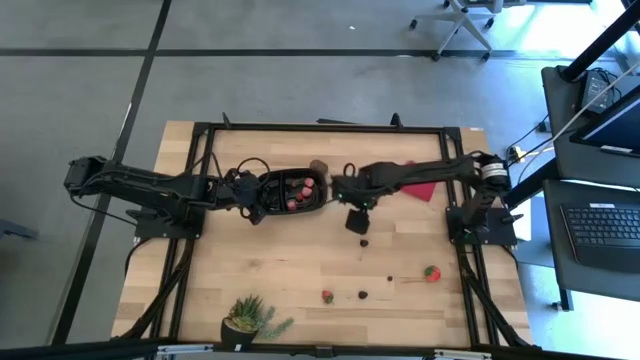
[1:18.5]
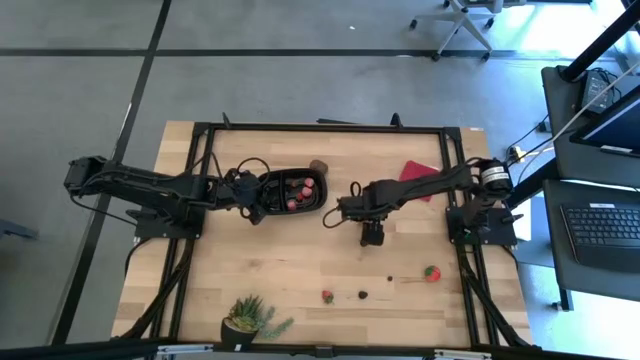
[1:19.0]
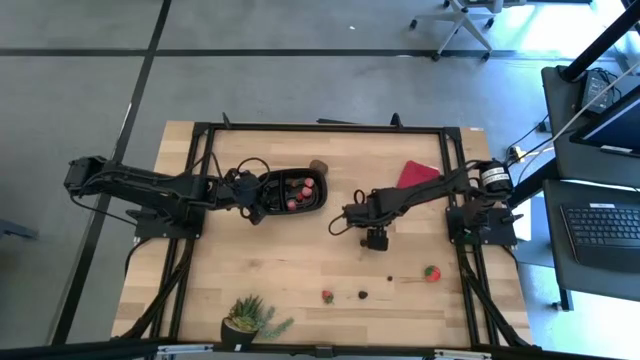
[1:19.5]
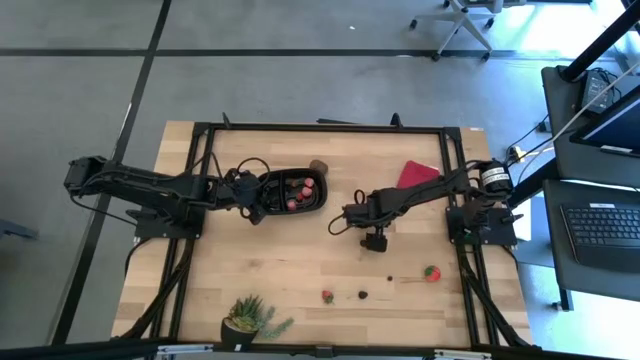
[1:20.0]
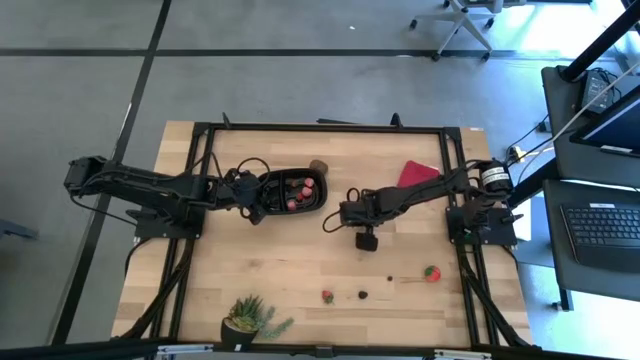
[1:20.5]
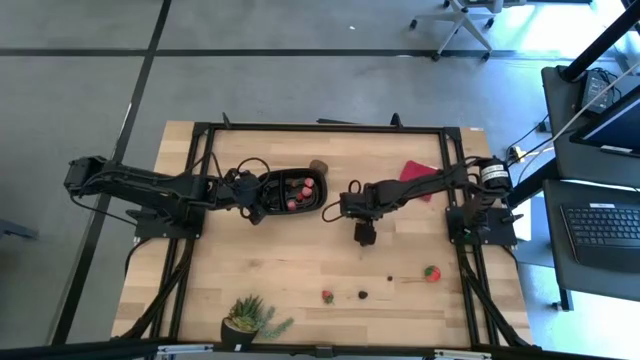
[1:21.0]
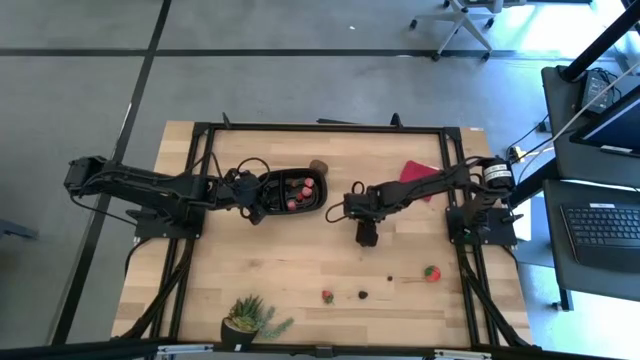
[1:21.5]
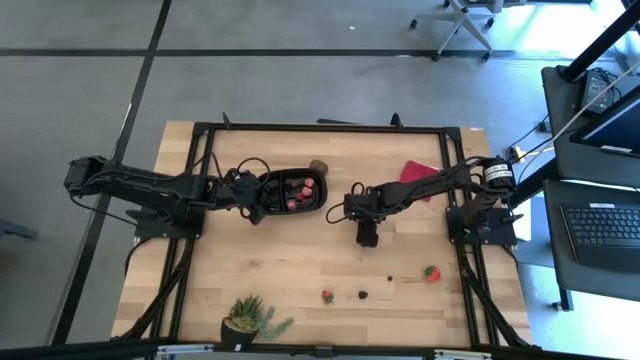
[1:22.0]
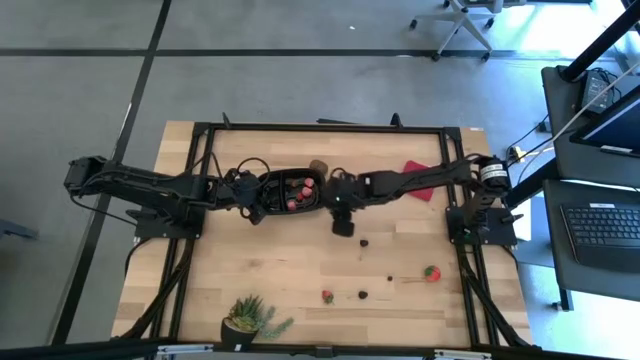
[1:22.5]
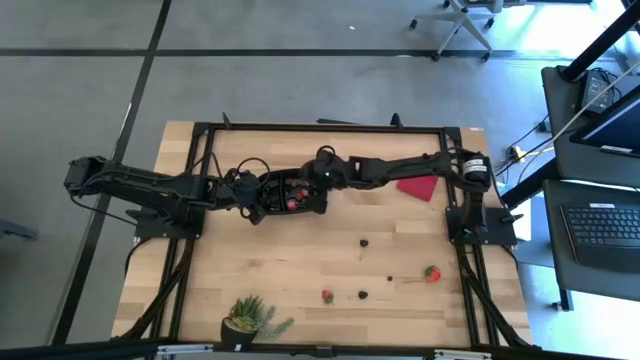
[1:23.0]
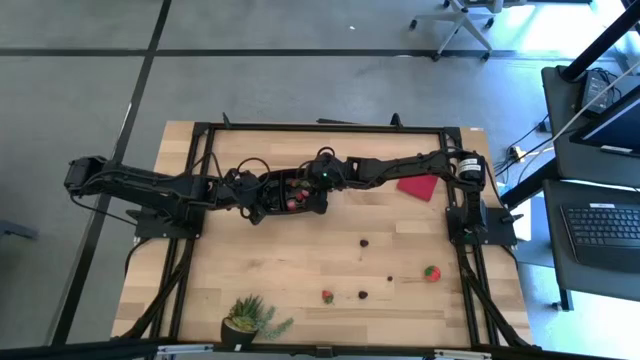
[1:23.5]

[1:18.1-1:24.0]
Task: Pick and placing Produce into tupperware
Put the red strawberry into the black bin

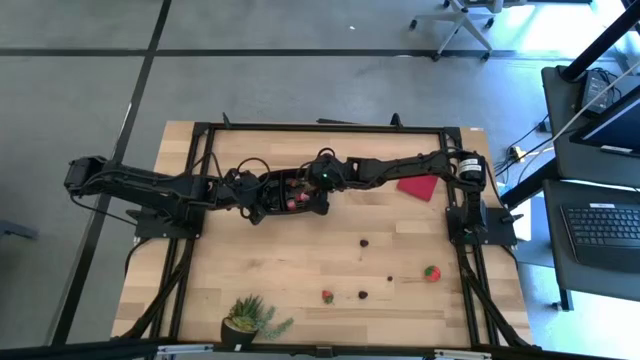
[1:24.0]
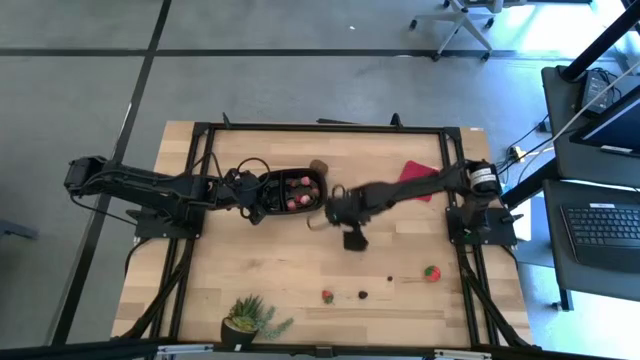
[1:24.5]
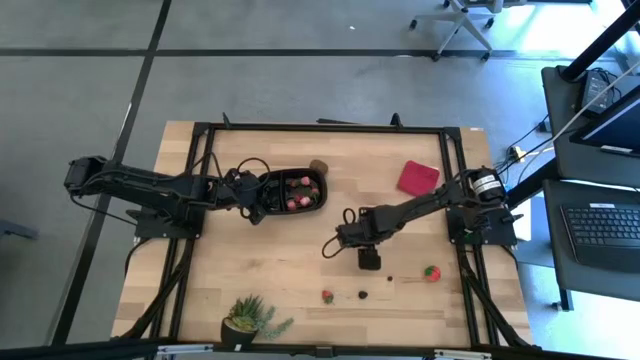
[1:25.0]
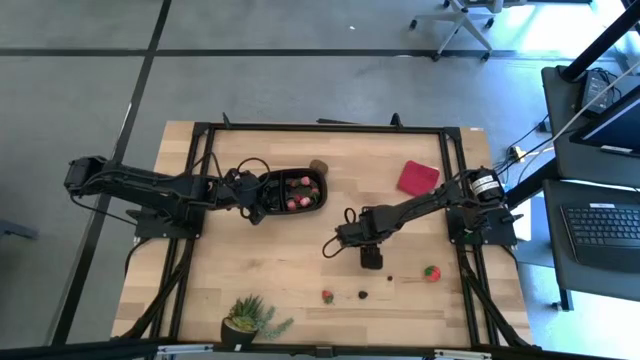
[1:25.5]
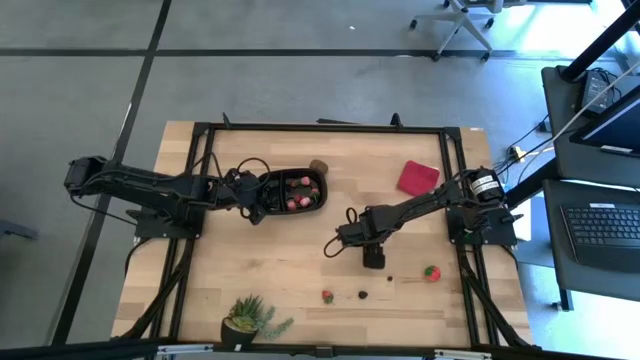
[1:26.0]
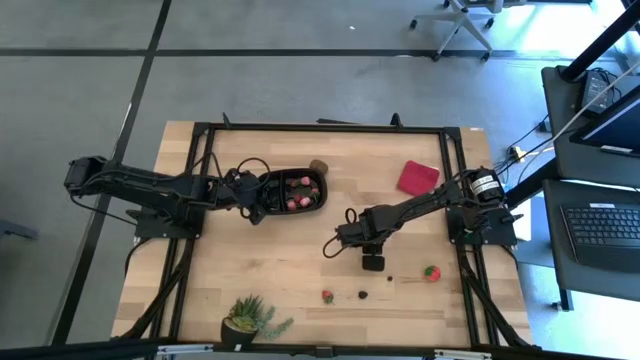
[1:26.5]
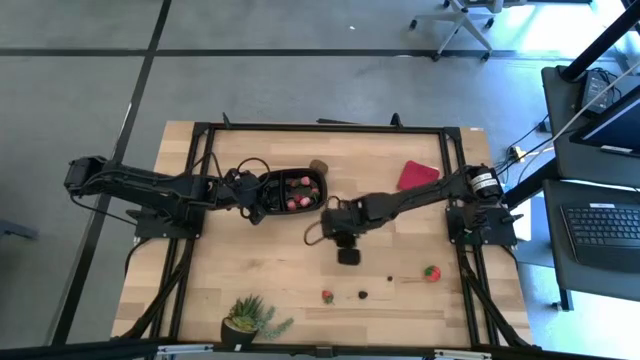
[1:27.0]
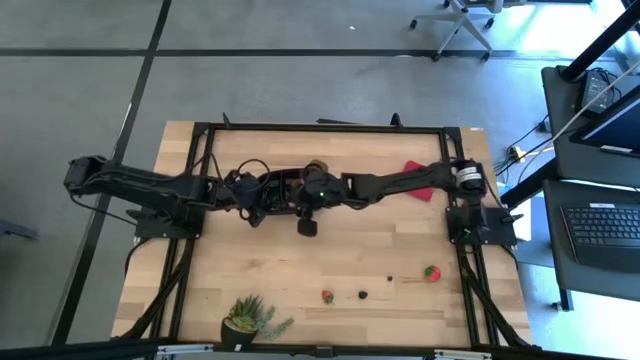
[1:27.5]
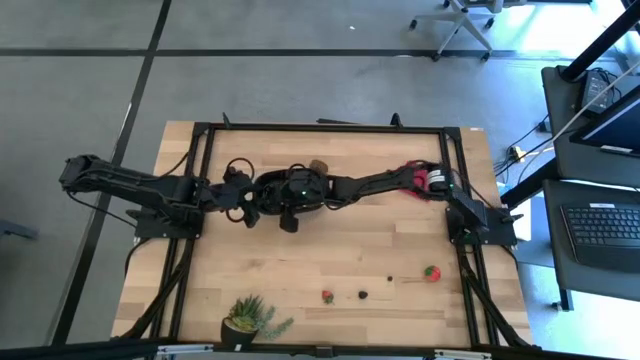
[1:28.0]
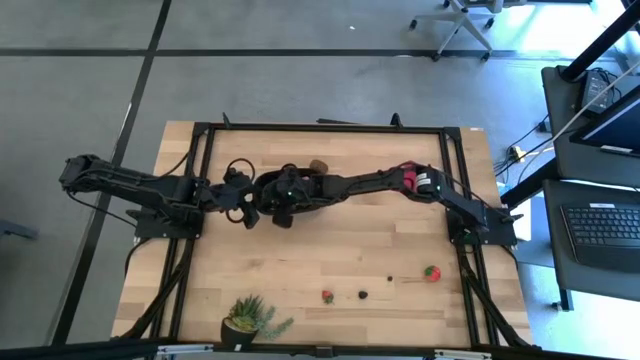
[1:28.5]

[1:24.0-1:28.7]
Put the blackberry into the black bin

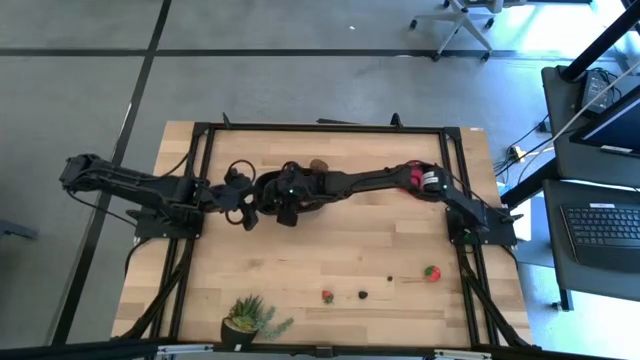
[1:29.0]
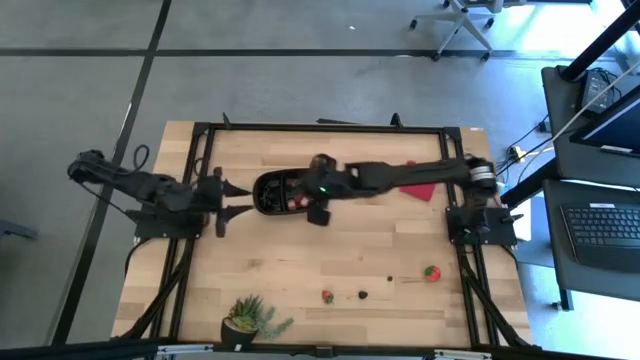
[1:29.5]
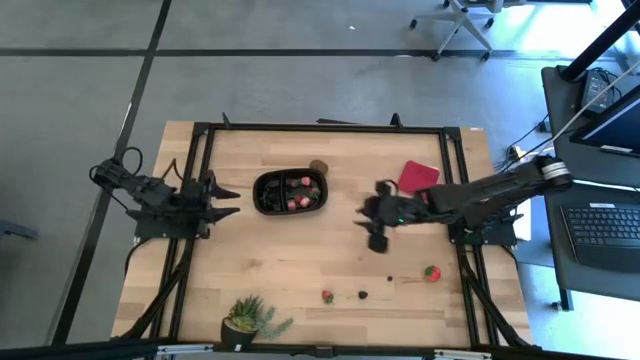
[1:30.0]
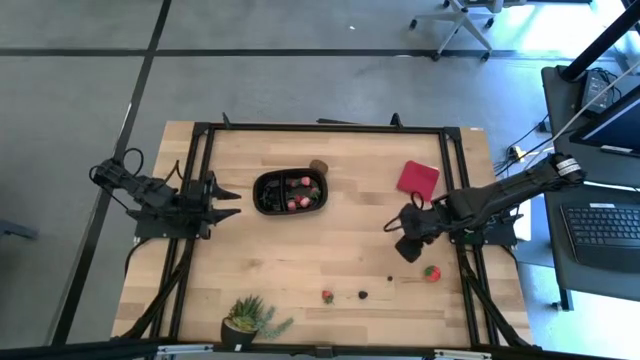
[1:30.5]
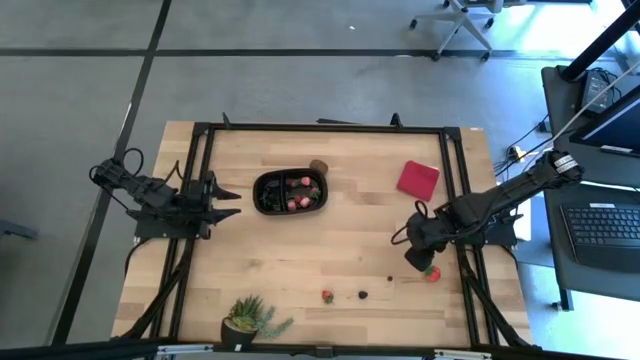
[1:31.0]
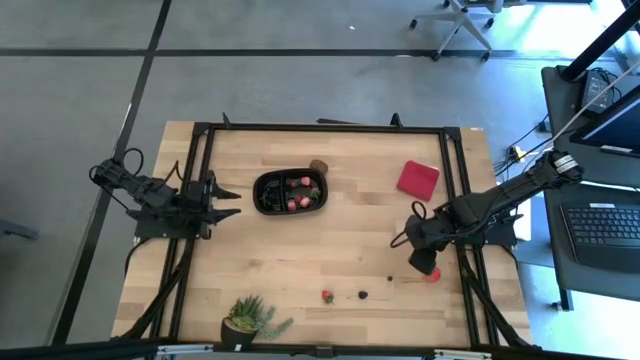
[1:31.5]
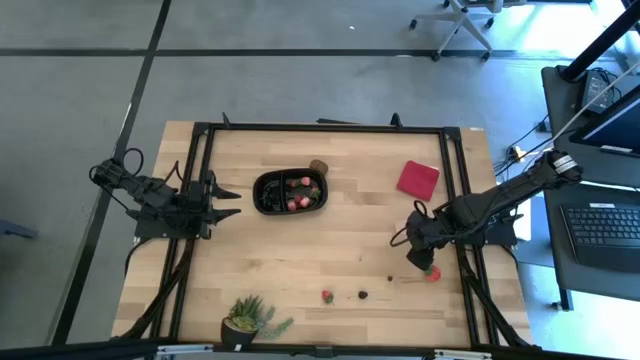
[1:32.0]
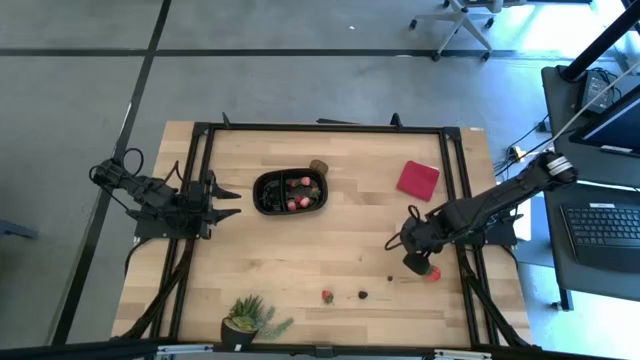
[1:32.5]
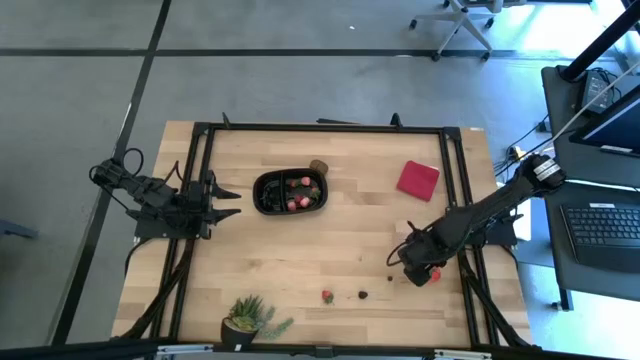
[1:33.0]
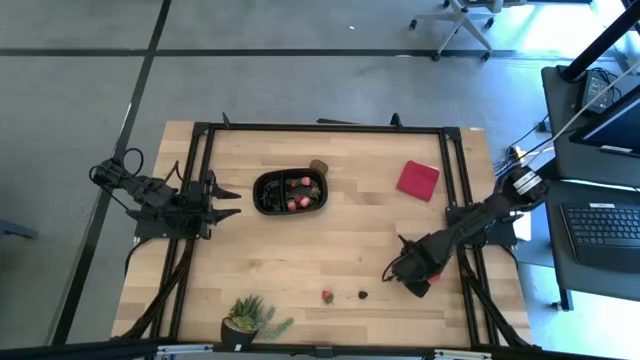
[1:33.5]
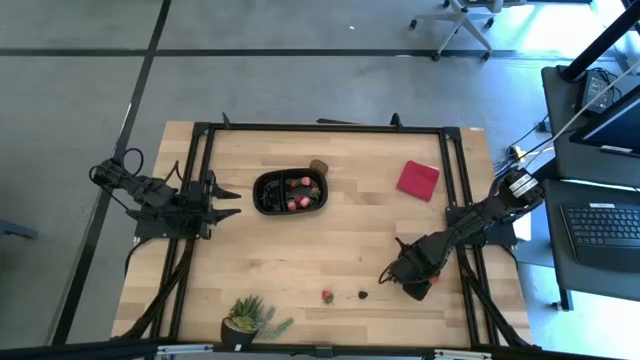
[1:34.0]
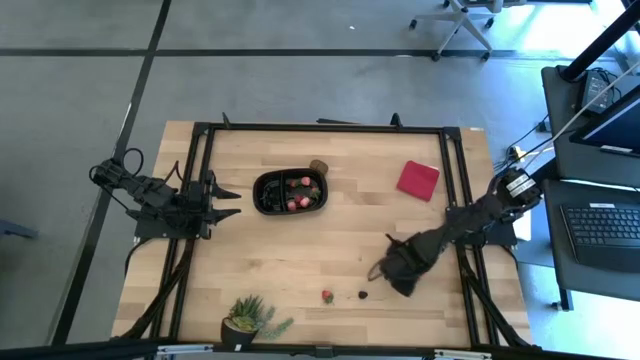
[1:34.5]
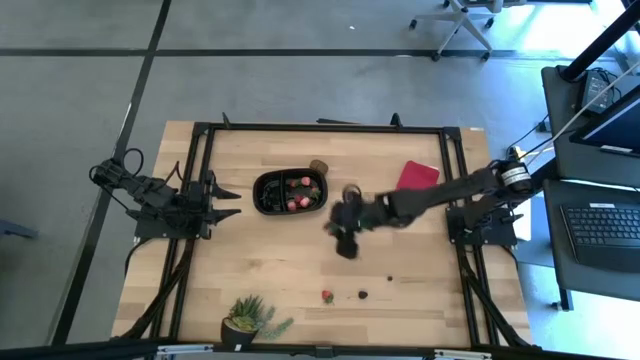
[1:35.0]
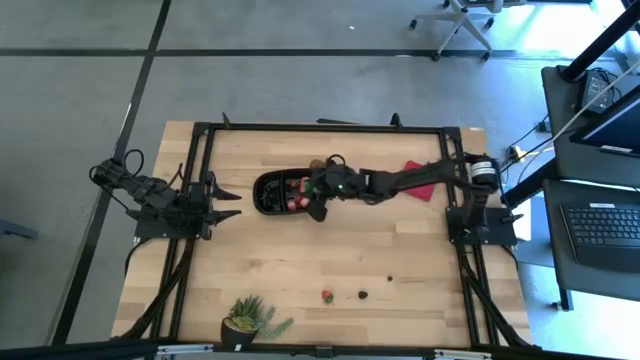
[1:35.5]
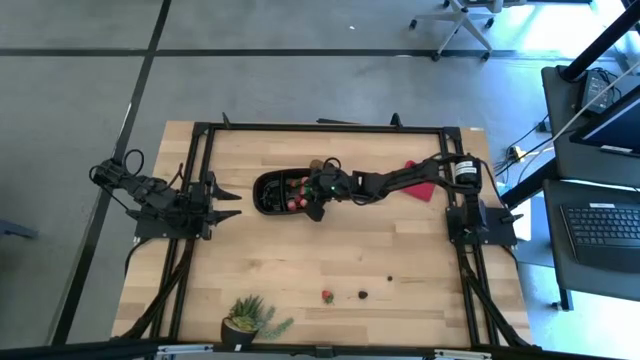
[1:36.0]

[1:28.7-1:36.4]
Put the red strawberry into the black bin

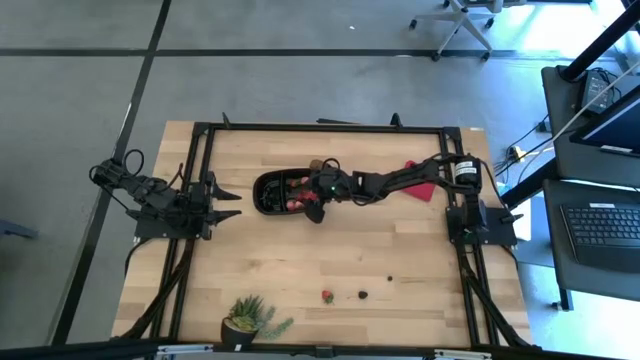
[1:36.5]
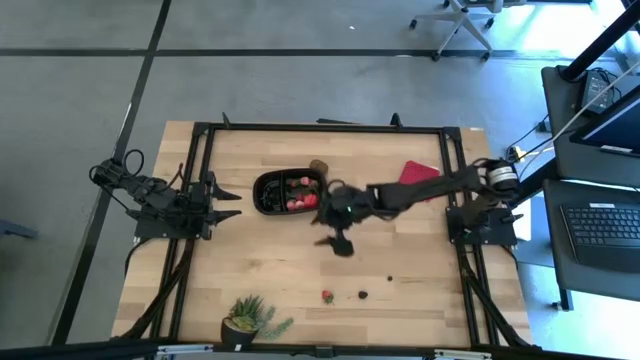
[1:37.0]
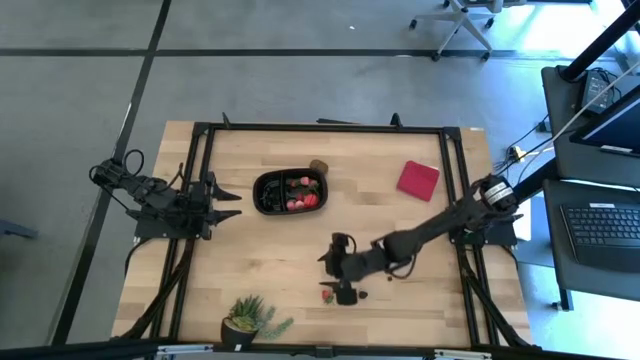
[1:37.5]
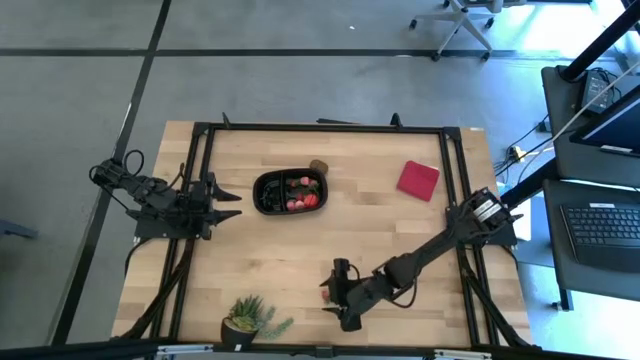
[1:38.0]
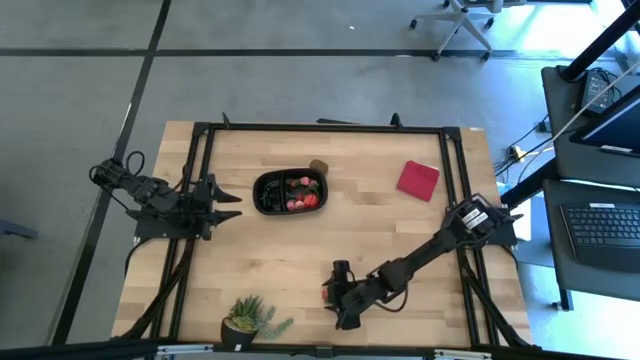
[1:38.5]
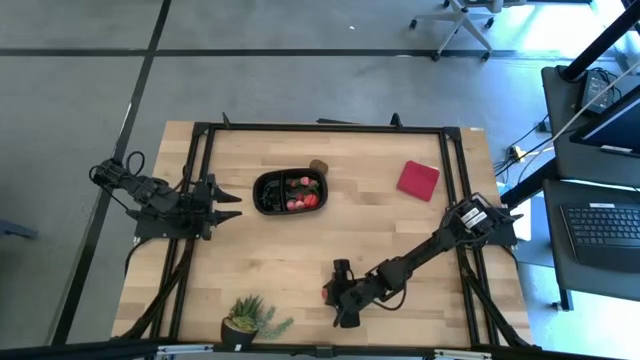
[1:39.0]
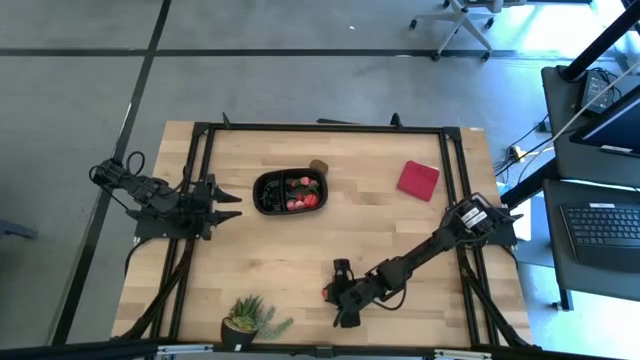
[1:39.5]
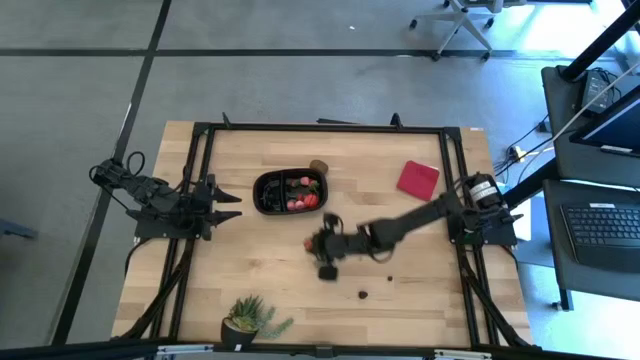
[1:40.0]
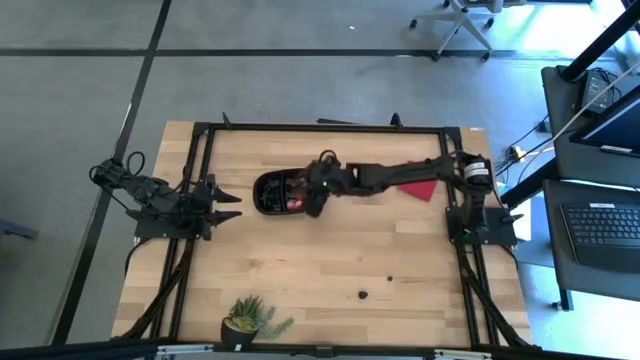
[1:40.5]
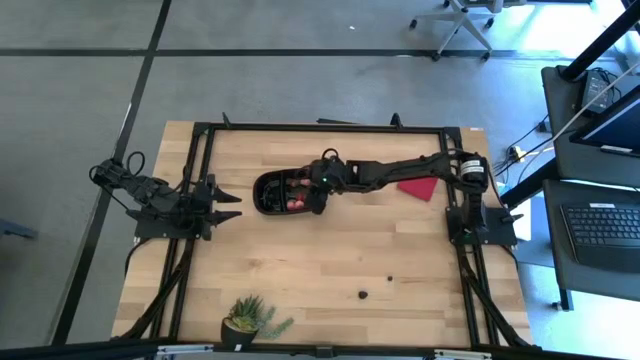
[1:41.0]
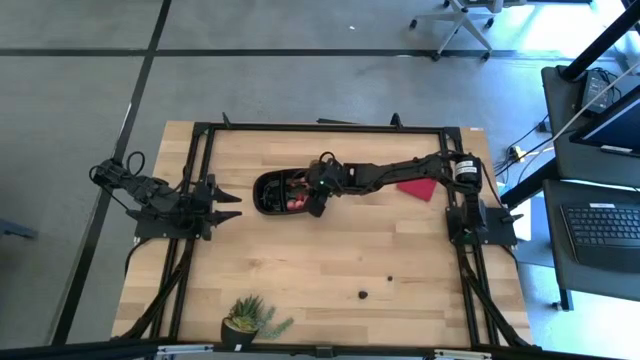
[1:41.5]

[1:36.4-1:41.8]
Put the red strawberry into the black bin
